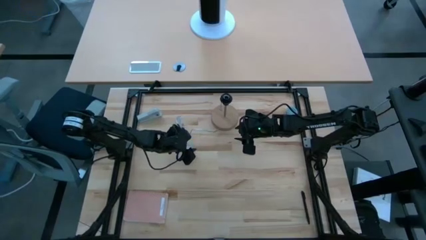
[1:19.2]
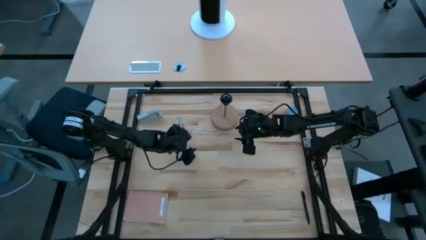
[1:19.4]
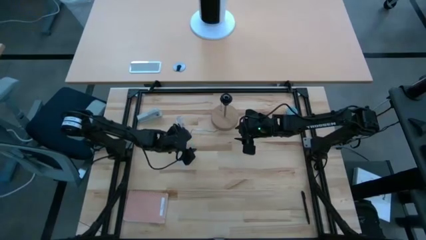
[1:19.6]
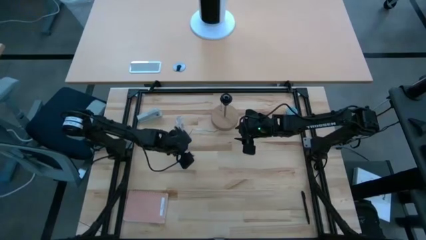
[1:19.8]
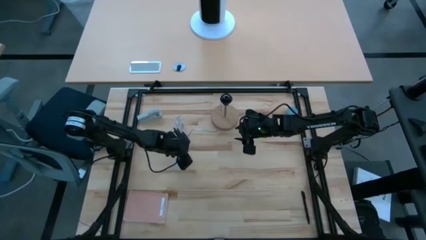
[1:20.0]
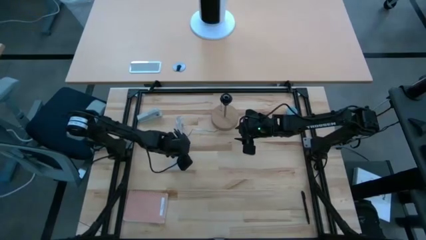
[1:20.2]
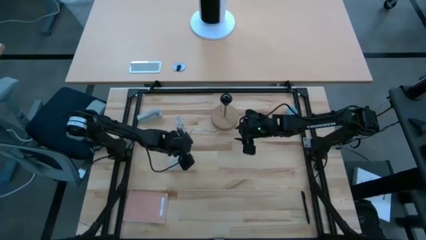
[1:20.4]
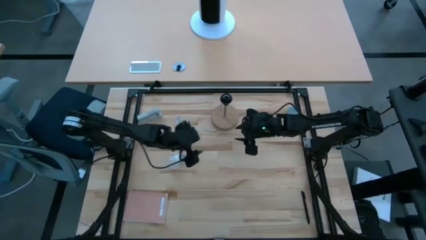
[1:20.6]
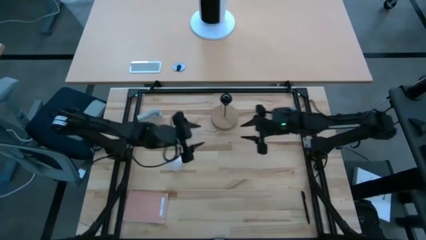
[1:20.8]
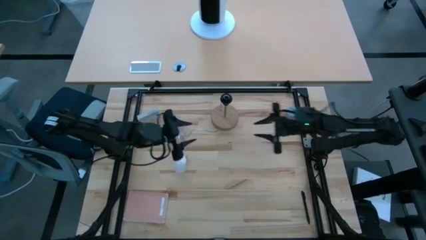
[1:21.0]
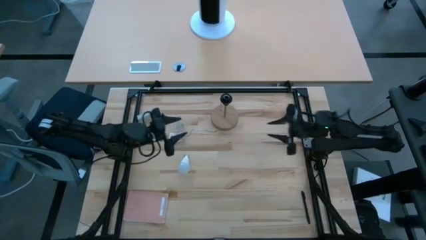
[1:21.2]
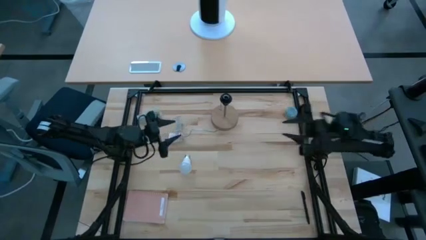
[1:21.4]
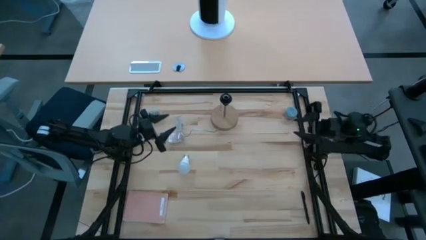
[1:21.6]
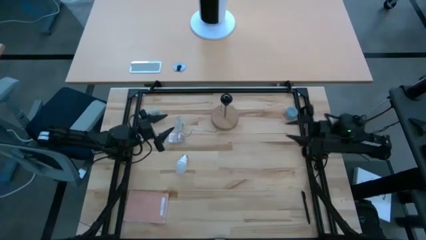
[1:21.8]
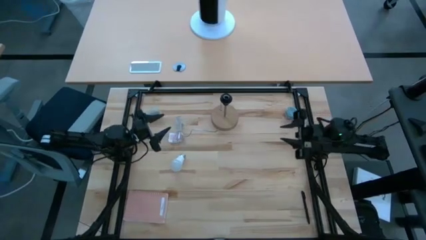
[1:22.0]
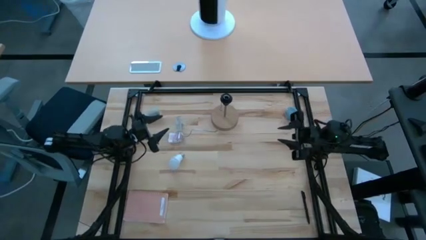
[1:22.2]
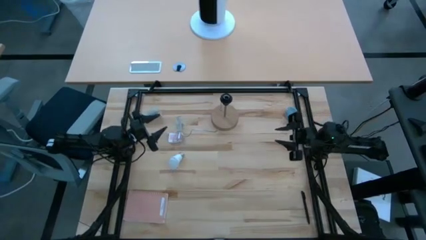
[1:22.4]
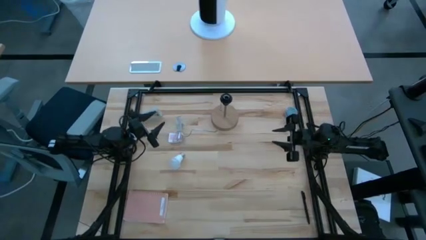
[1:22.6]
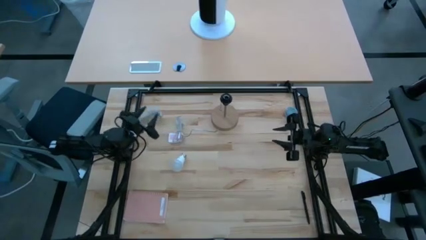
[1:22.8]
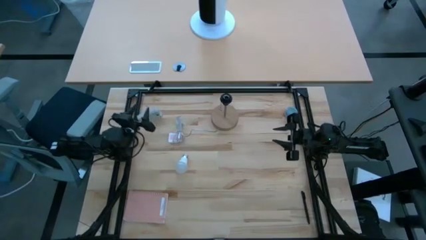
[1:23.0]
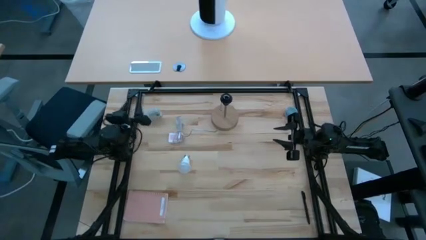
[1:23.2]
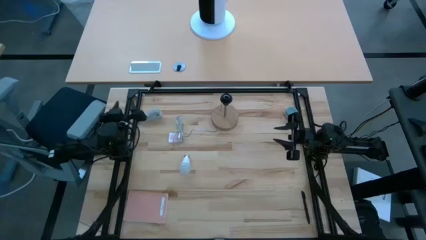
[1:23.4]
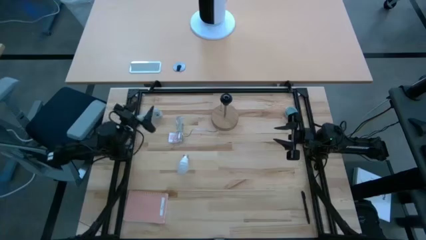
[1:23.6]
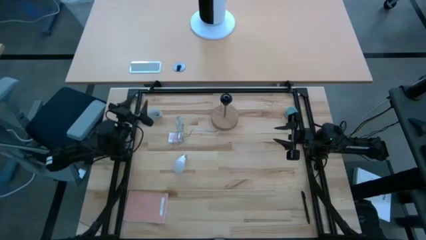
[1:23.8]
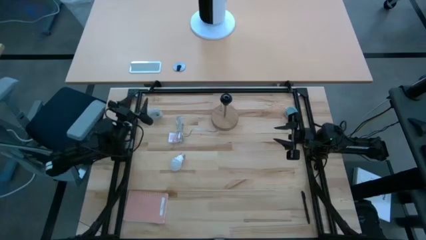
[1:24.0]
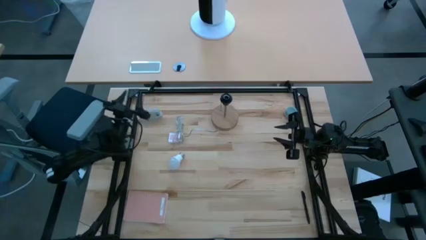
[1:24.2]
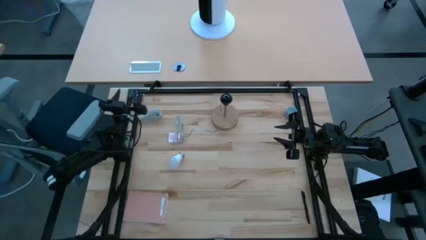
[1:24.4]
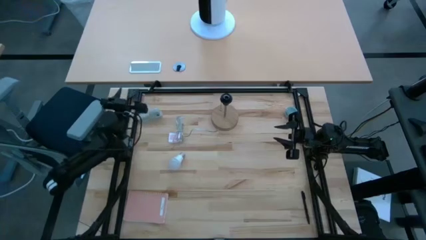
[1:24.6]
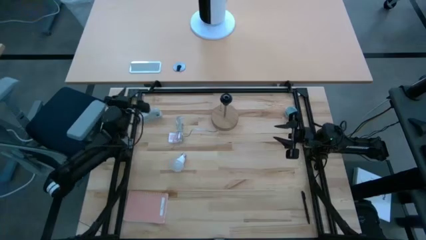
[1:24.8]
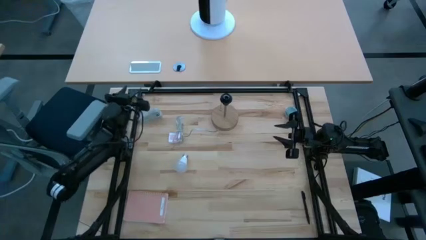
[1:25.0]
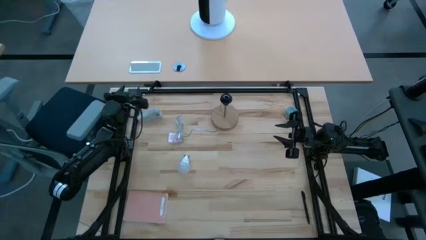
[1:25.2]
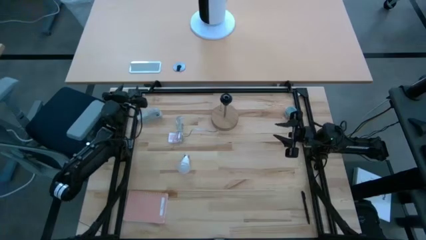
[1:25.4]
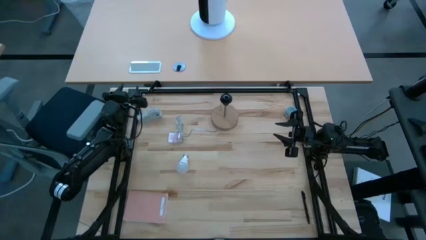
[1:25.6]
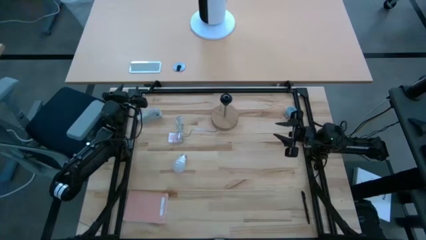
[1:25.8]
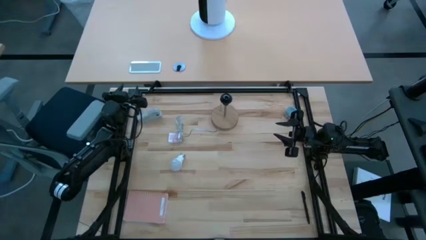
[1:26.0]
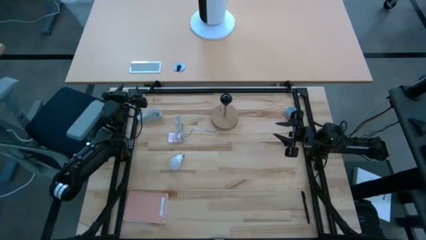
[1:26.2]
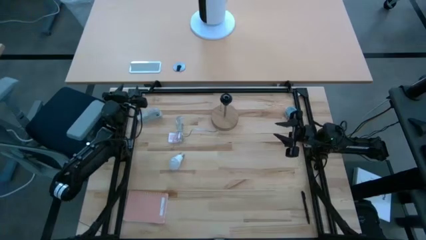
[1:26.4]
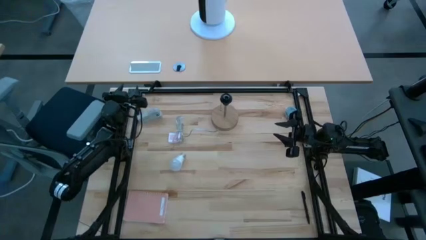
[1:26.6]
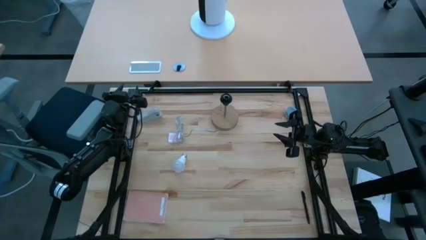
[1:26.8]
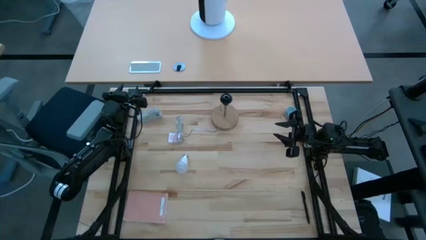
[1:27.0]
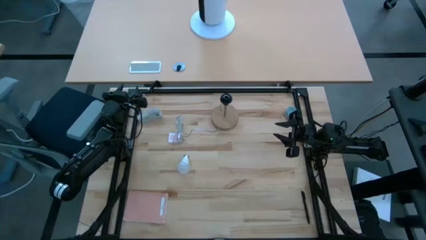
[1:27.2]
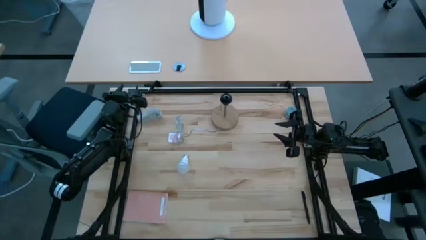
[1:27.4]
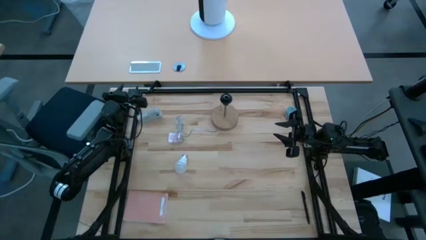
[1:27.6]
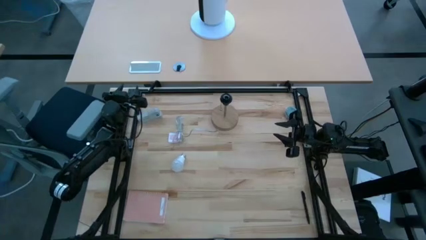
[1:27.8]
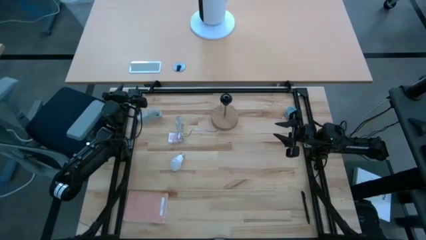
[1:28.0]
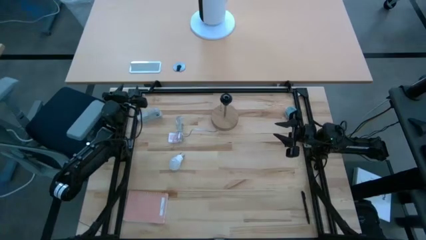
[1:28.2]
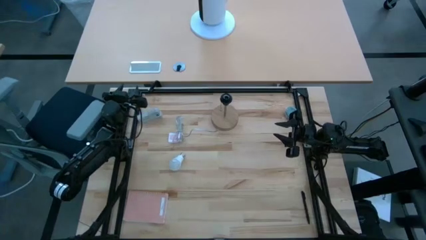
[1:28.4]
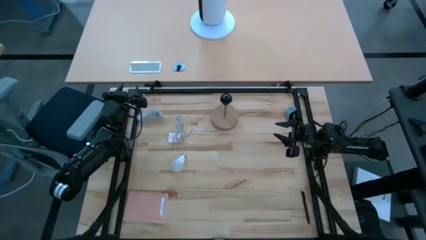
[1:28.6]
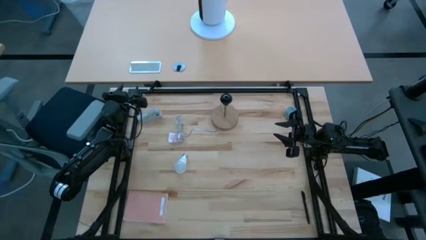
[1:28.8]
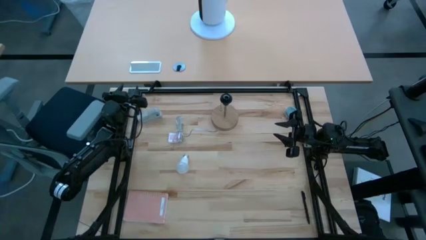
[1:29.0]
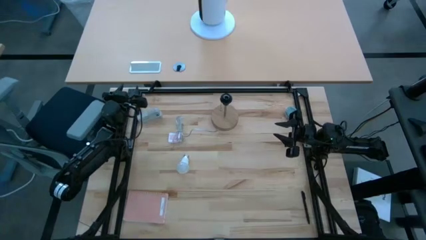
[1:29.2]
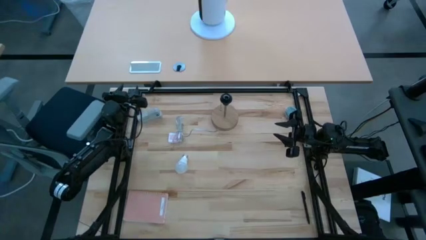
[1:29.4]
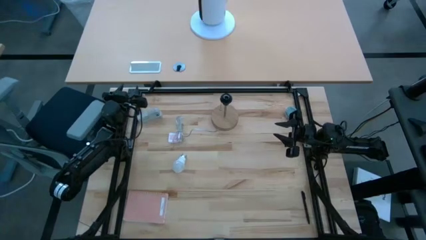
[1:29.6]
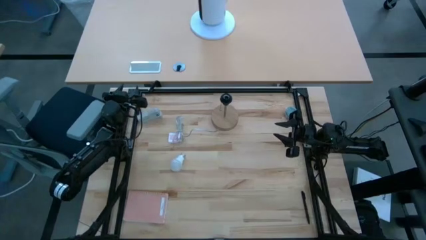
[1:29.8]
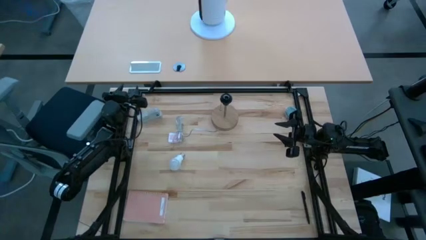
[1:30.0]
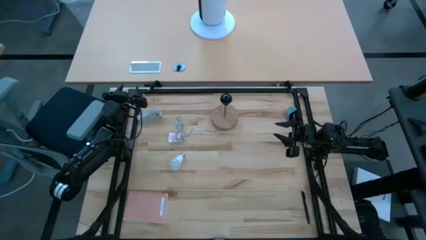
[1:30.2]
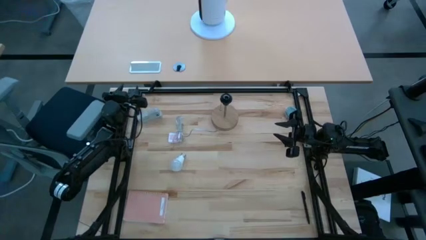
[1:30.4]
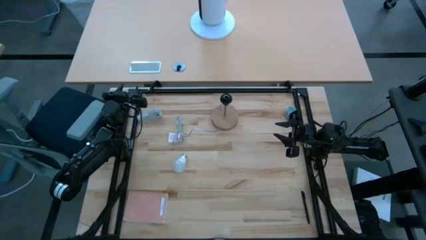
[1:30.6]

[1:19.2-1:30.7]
Task: Screw lightbulb
Return to Home Position
